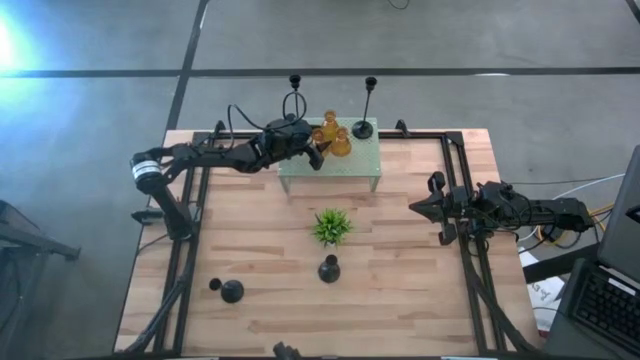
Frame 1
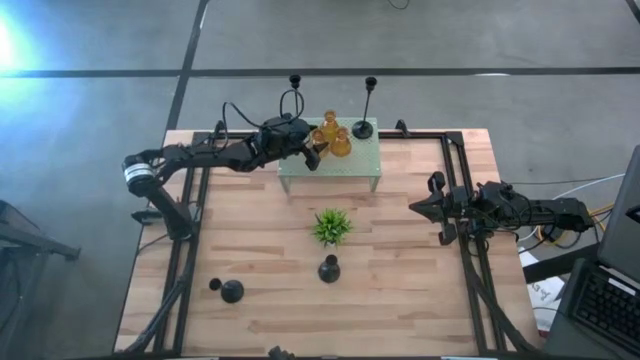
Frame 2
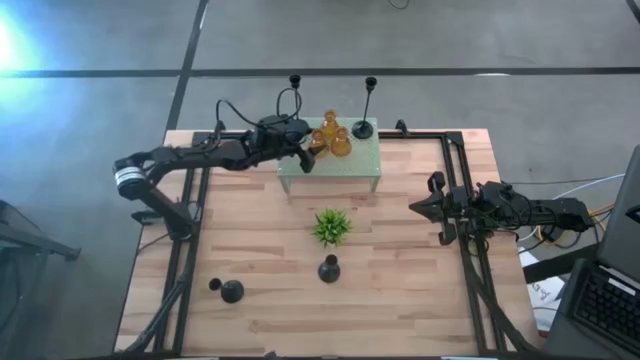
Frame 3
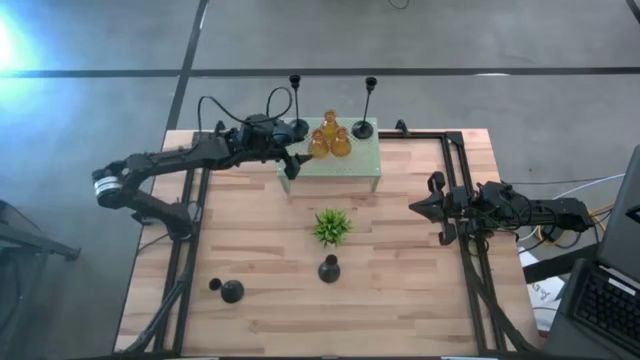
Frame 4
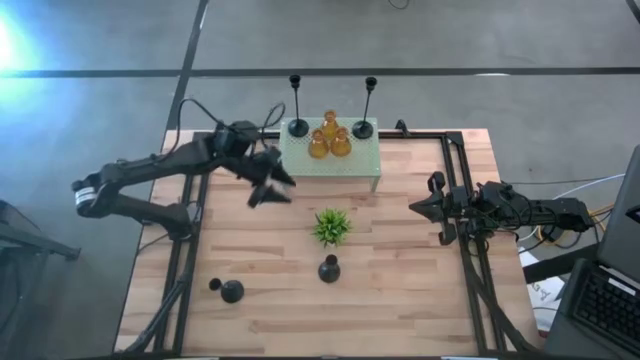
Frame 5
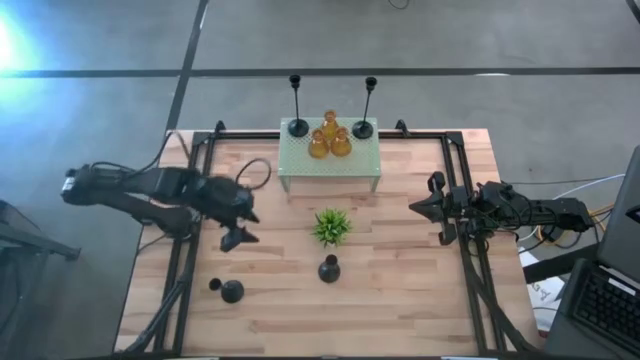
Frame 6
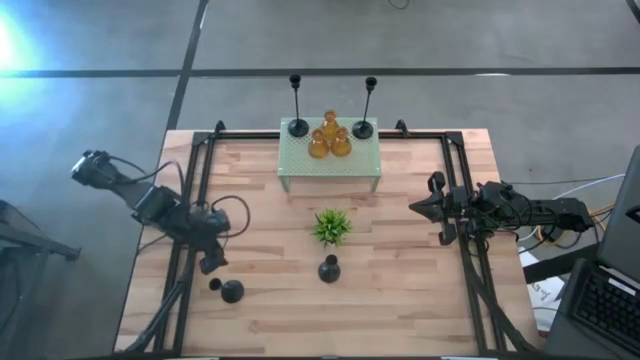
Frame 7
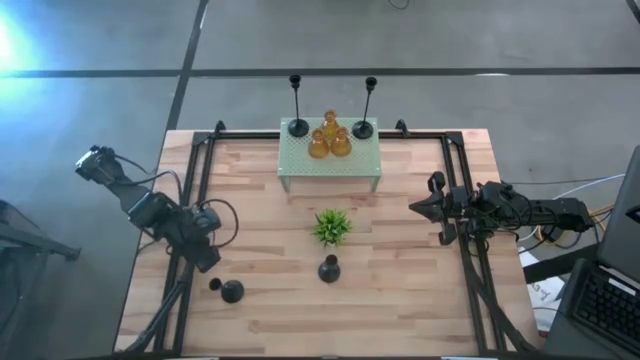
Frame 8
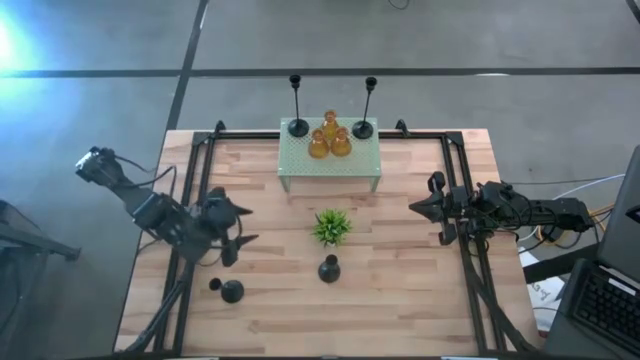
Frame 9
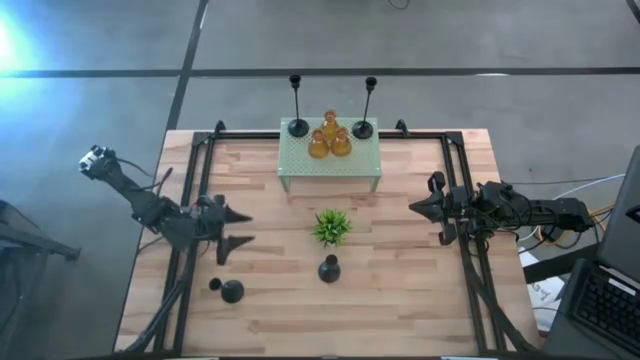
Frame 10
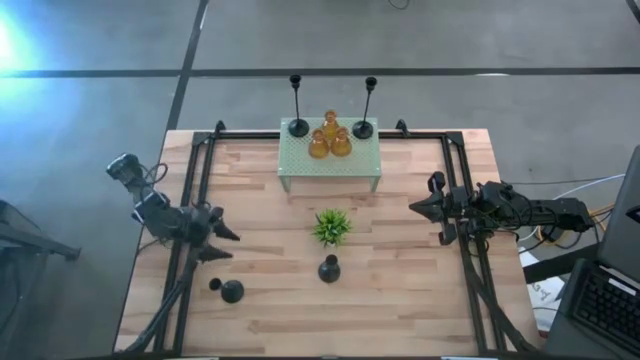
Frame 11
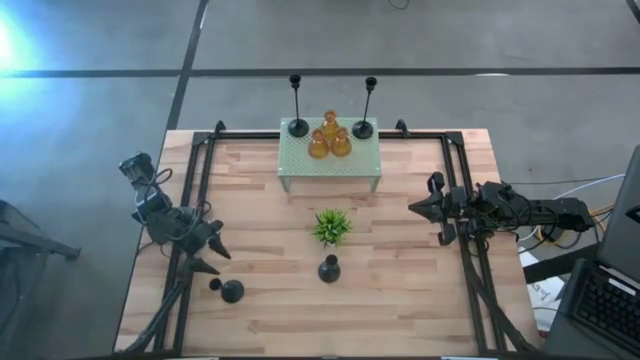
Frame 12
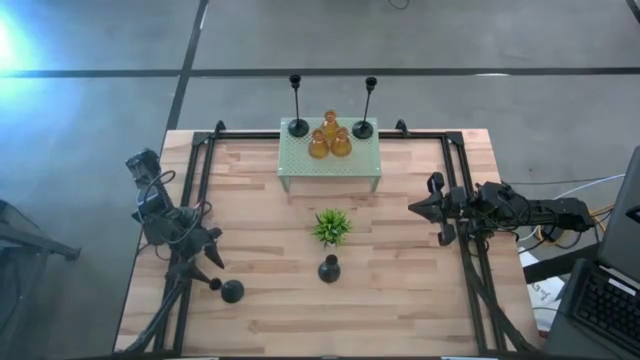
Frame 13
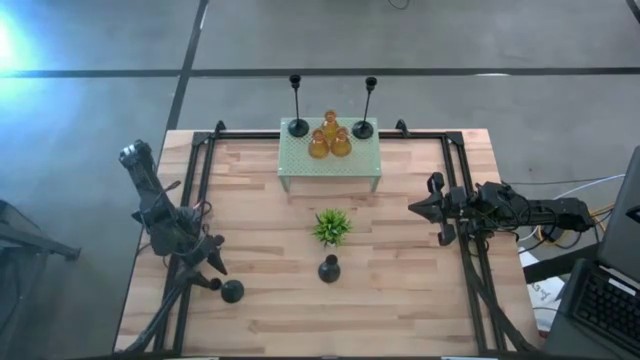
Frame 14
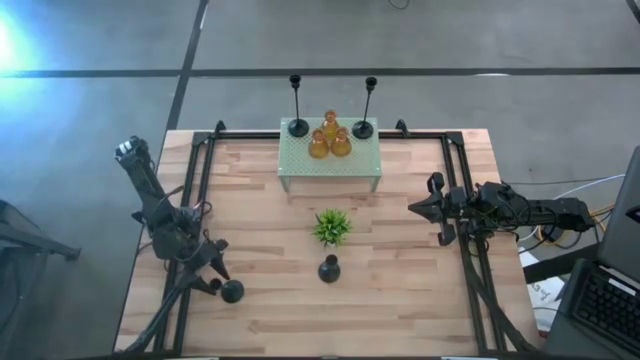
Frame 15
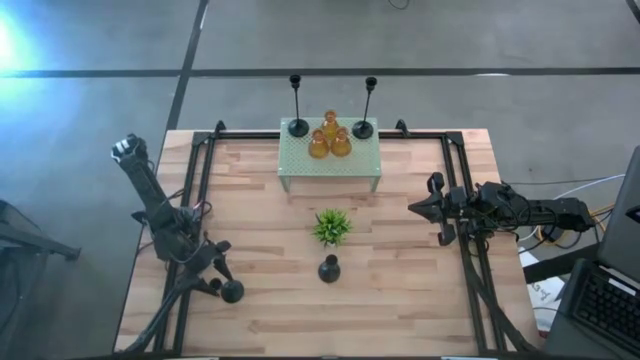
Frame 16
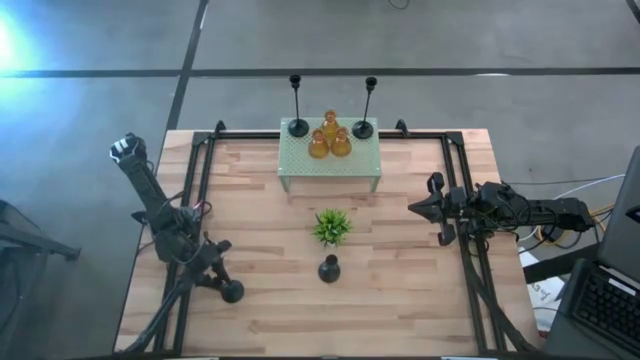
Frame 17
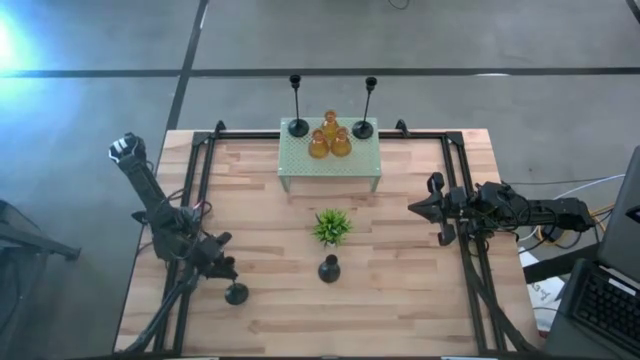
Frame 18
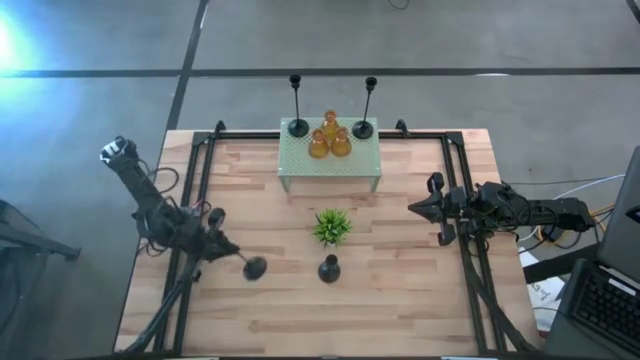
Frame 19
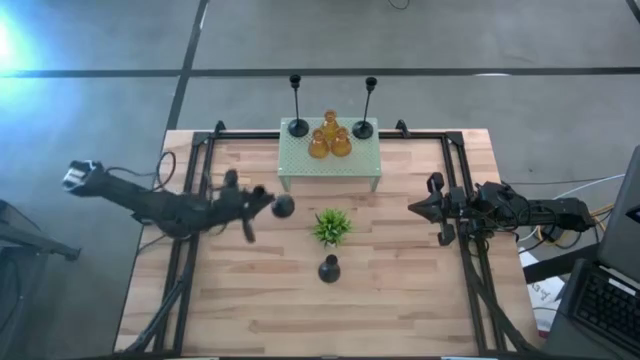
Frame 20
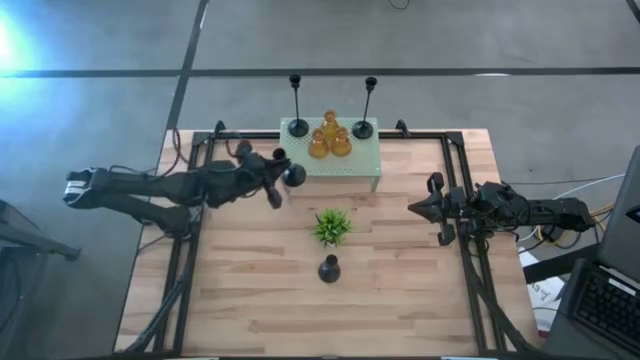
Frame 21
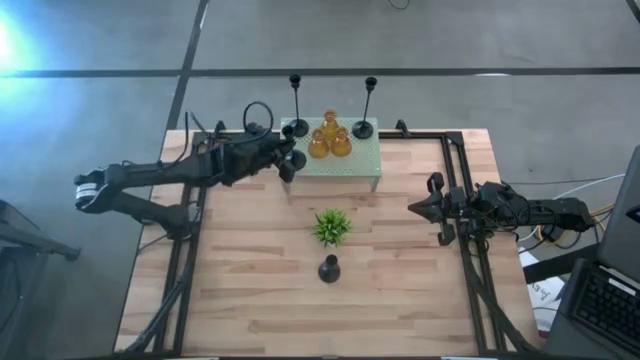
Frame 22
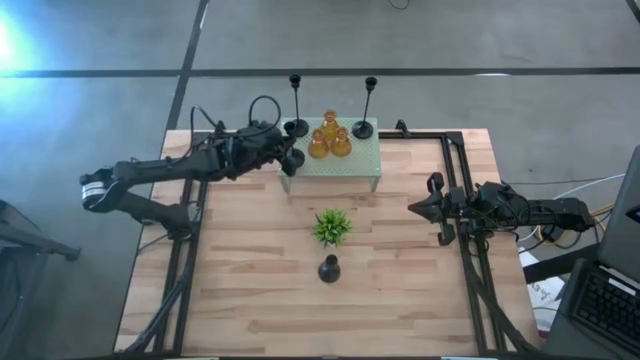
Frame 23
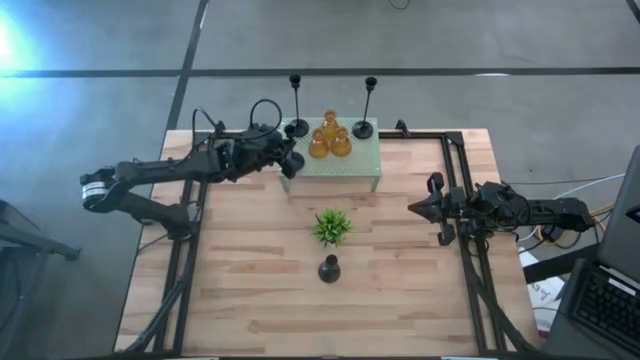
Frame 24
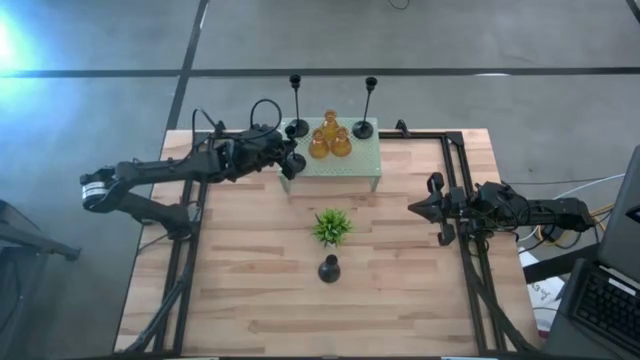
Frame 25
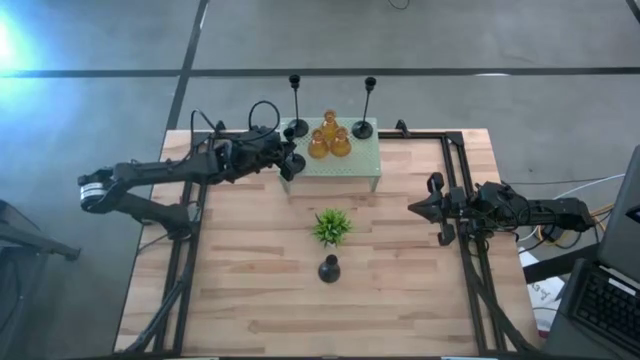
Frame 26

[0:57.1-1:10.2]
Task: Pick & Place candle stick holders
Put the black candle holder on the shelf

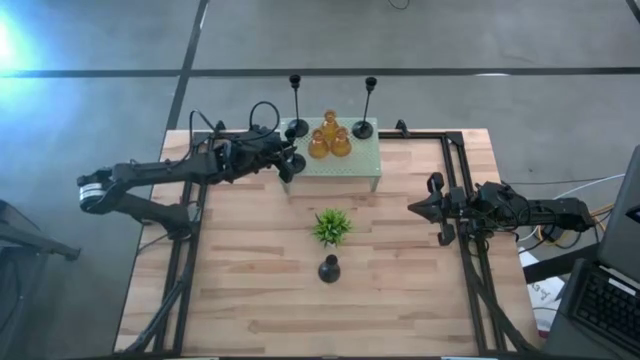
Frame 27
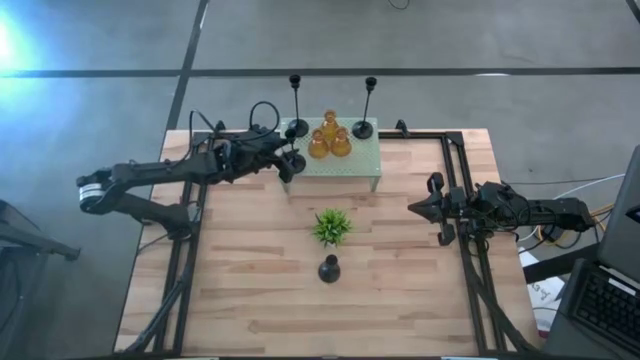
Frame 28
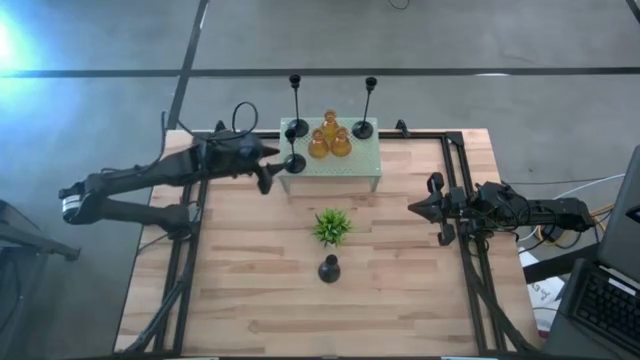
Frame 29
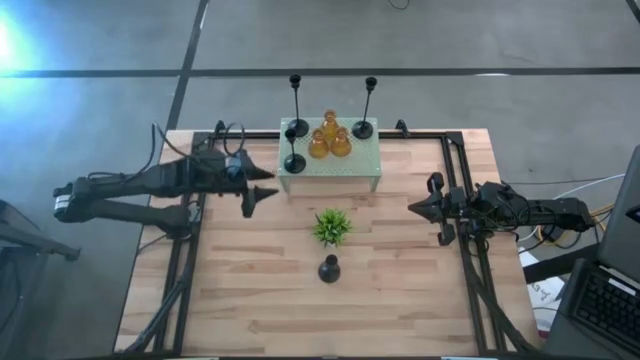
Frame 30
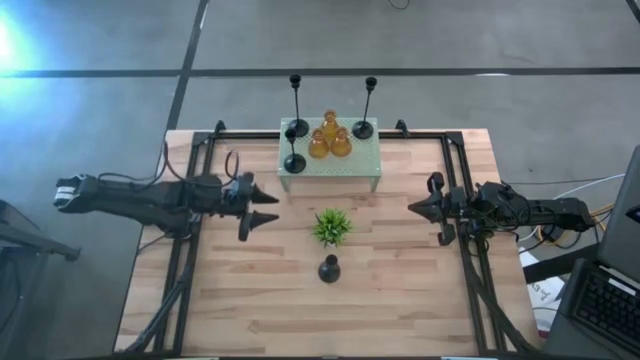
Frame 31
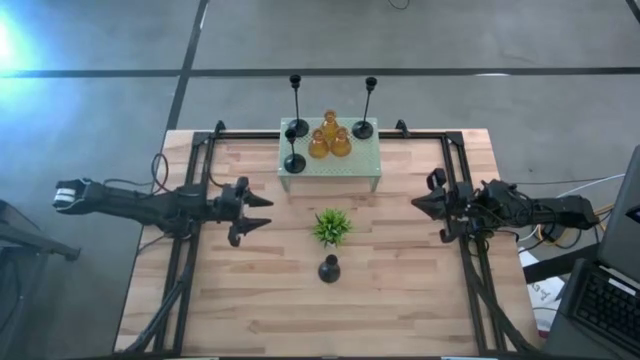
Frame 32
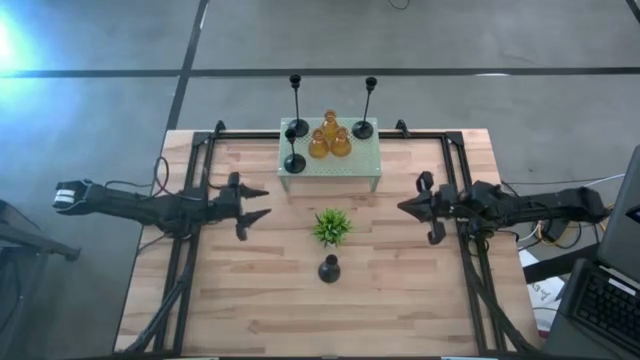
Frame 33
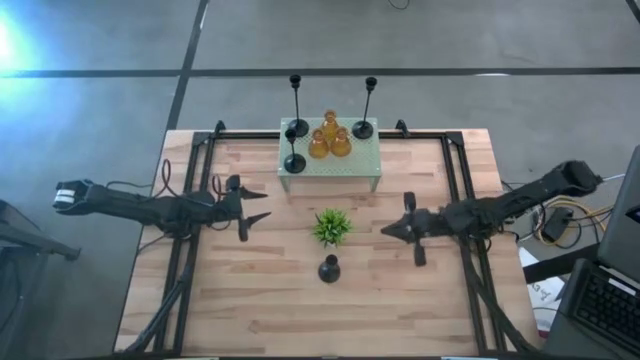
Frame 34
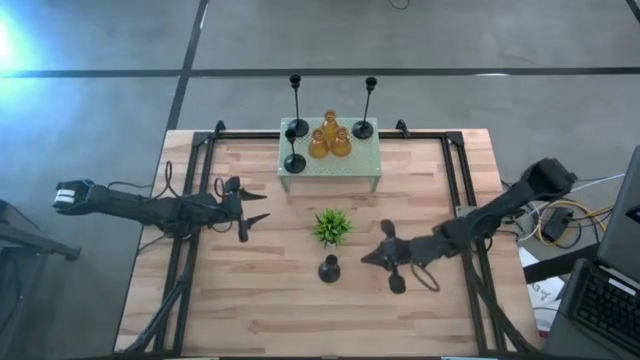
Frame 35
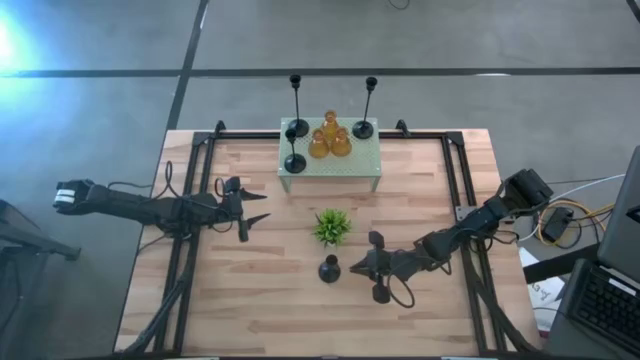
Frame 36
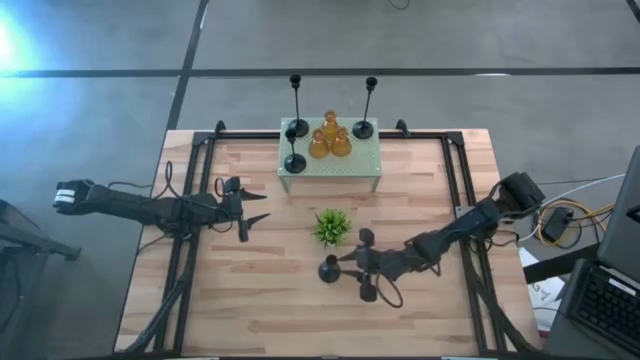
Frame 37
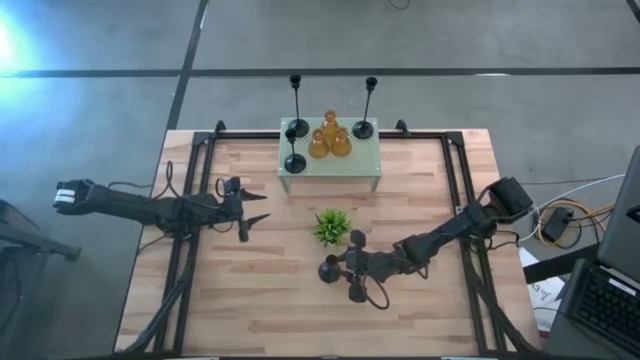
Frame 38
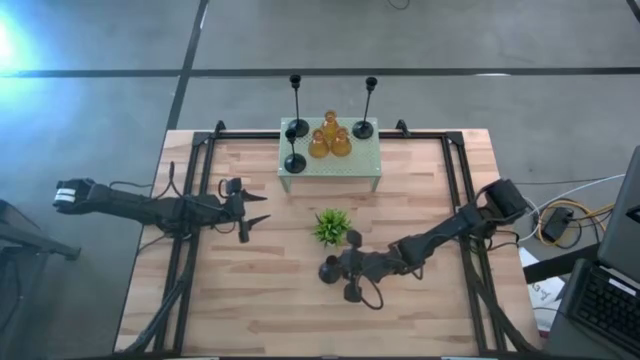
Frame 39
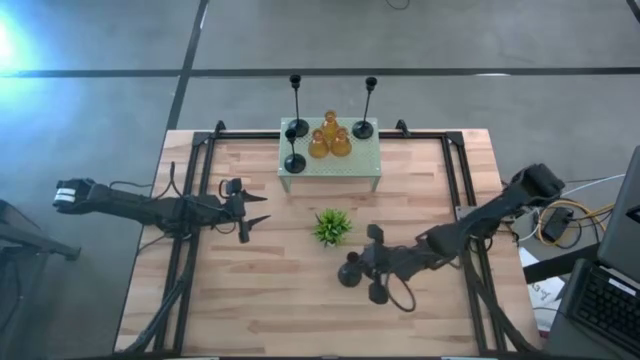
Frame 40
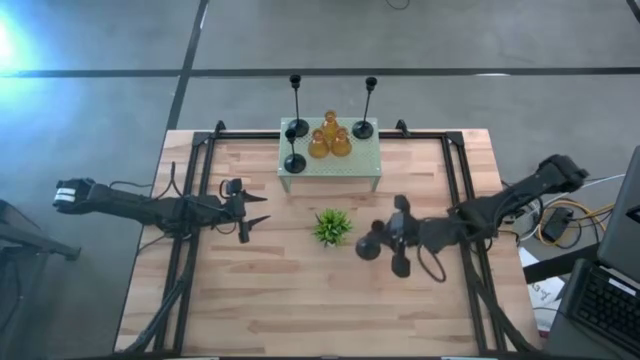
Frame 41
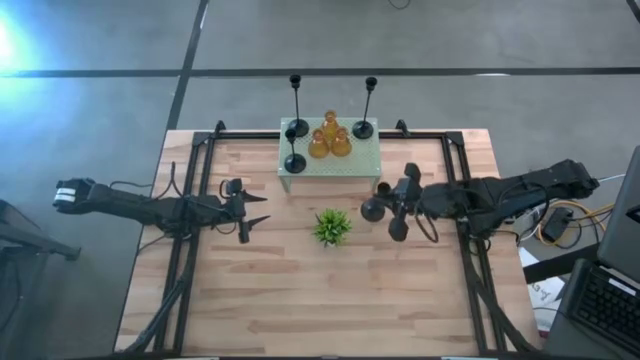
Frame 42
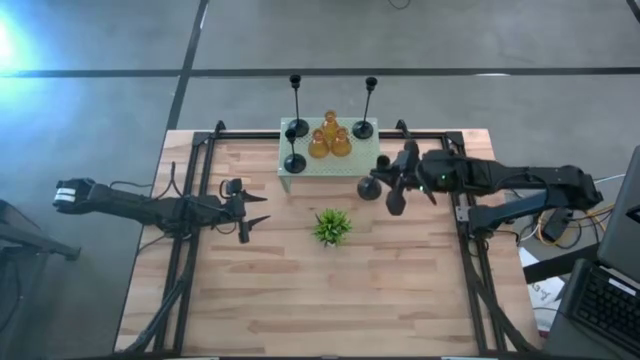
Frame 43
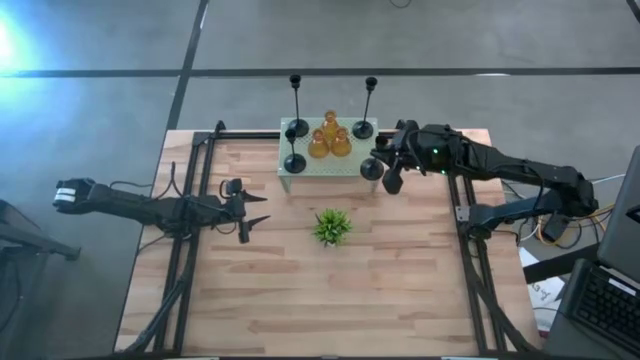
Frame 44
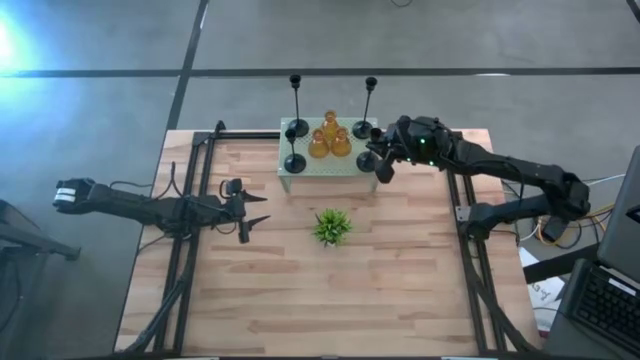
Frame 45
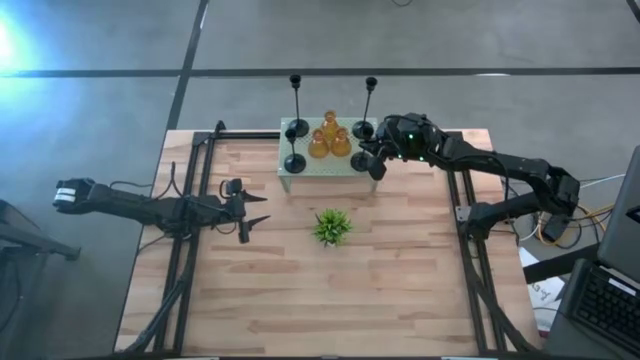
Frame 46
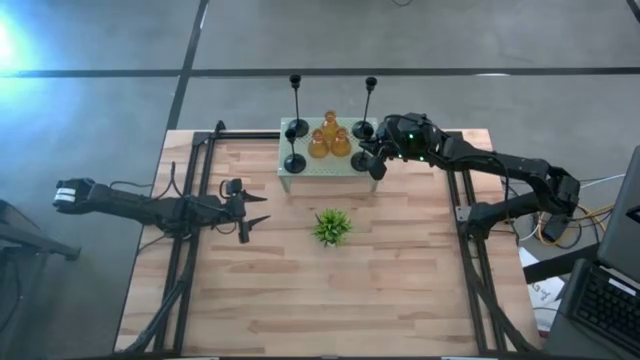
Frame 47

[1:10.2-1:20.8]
Put the black candle holder on the shelf
